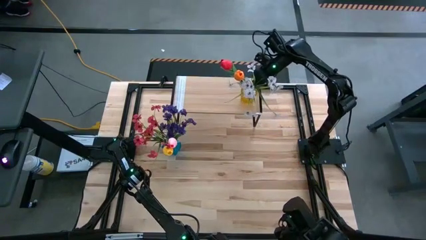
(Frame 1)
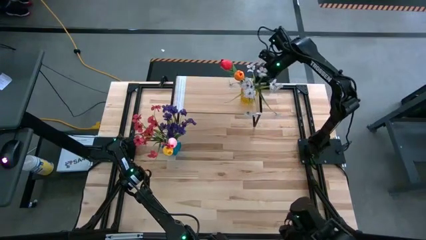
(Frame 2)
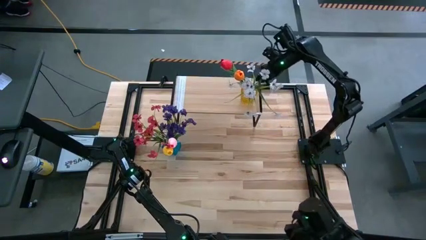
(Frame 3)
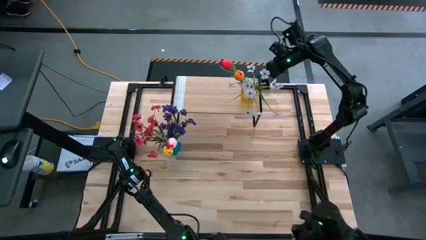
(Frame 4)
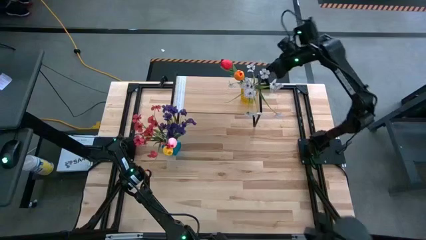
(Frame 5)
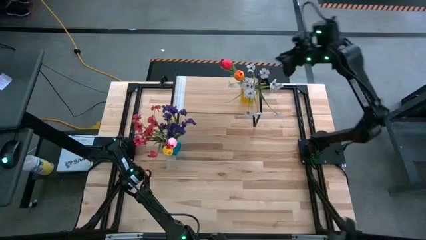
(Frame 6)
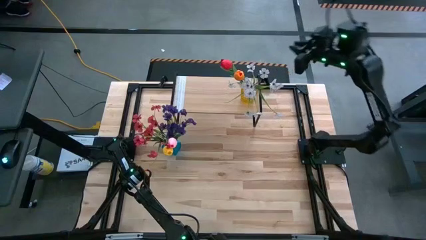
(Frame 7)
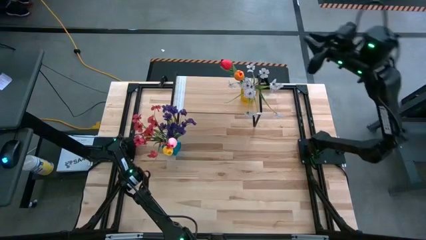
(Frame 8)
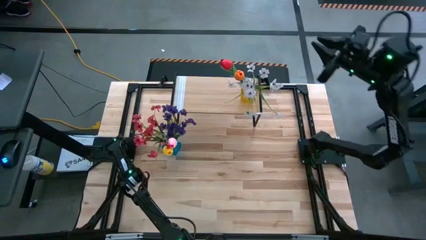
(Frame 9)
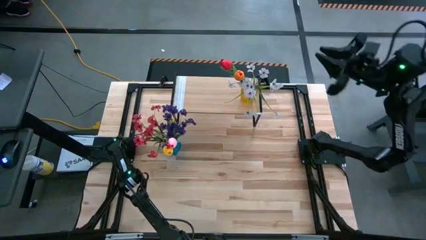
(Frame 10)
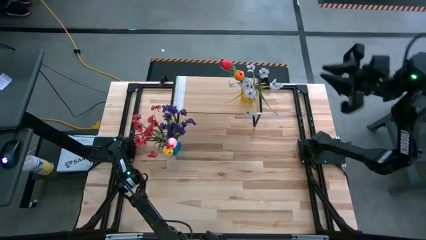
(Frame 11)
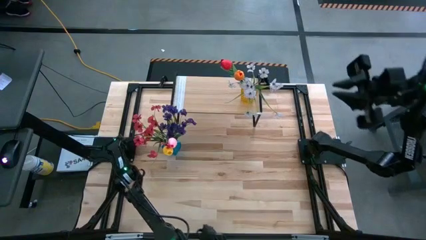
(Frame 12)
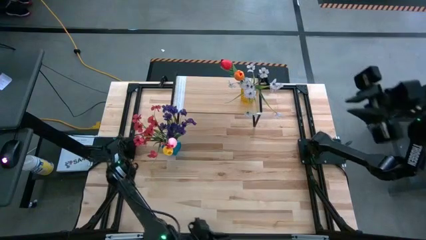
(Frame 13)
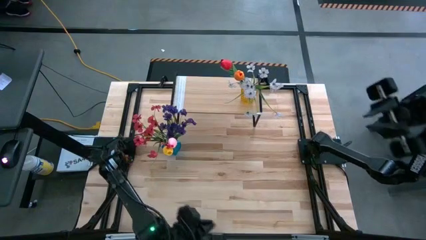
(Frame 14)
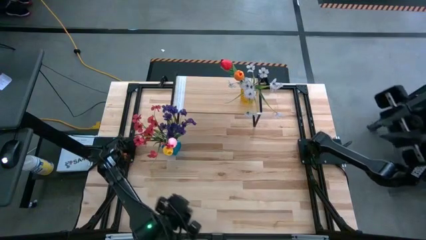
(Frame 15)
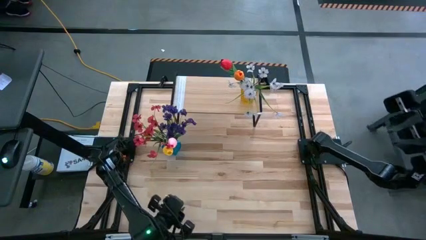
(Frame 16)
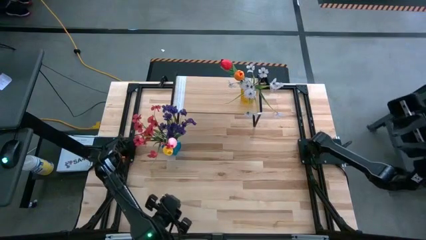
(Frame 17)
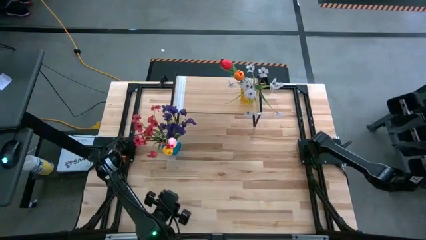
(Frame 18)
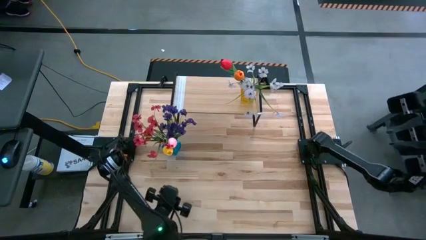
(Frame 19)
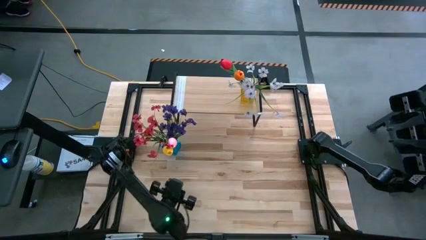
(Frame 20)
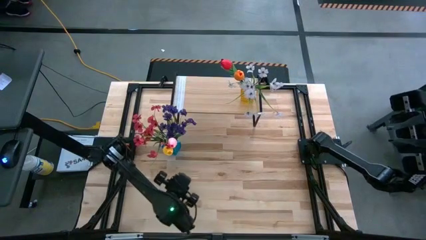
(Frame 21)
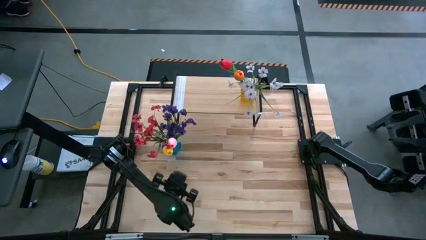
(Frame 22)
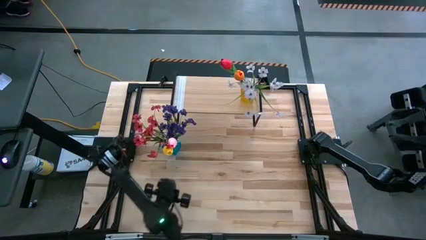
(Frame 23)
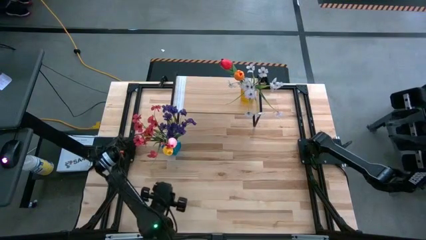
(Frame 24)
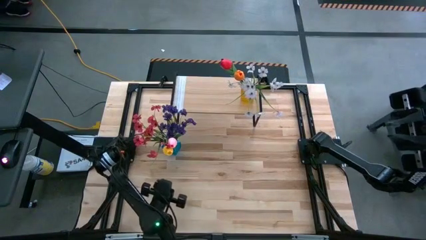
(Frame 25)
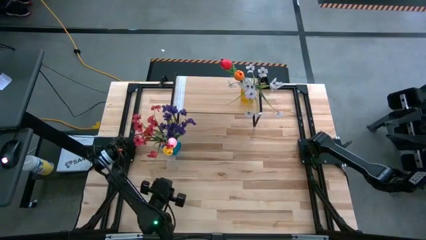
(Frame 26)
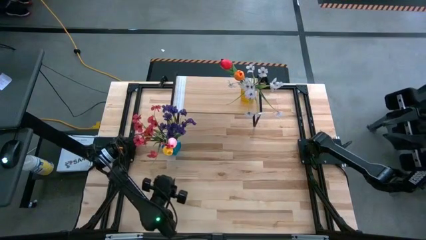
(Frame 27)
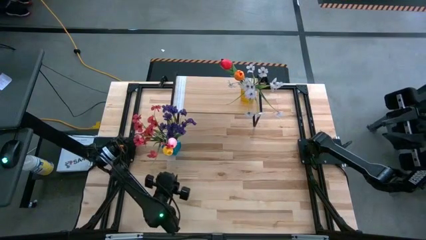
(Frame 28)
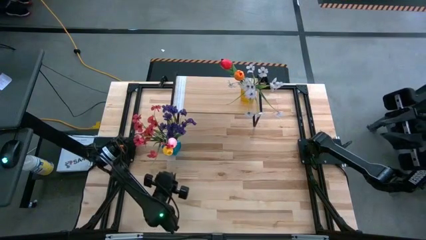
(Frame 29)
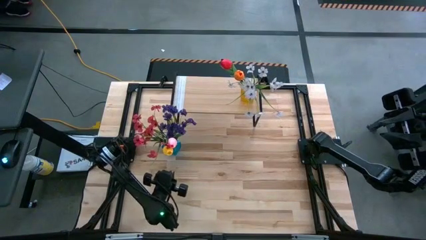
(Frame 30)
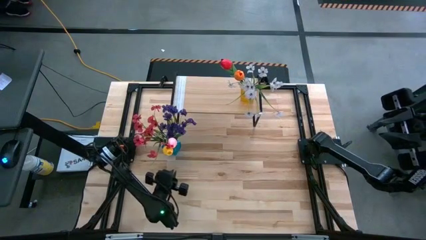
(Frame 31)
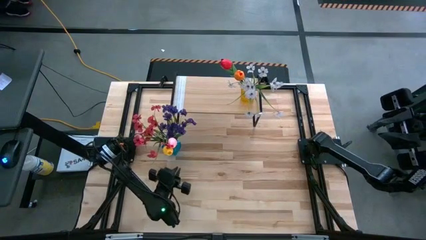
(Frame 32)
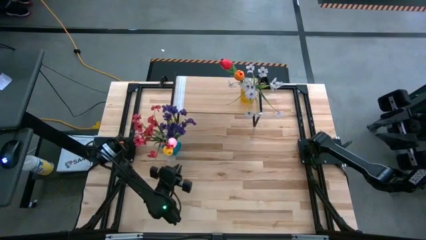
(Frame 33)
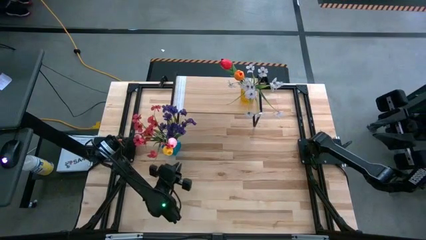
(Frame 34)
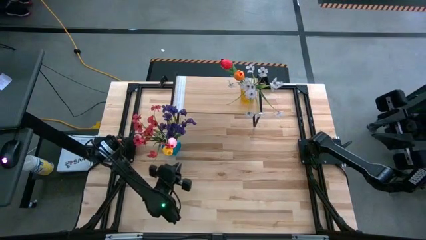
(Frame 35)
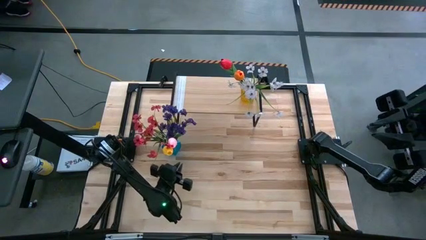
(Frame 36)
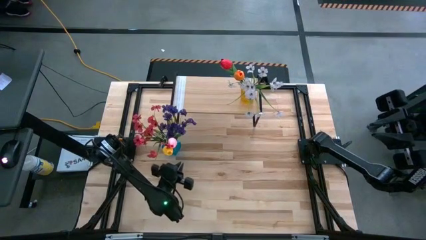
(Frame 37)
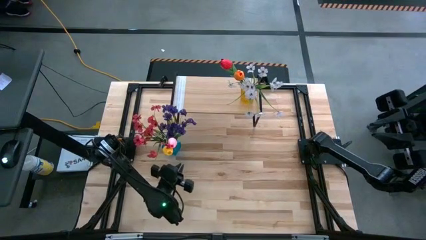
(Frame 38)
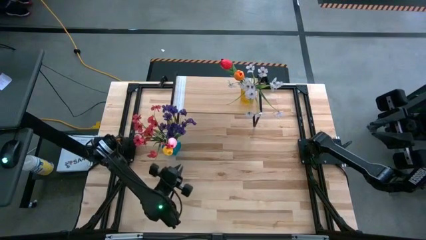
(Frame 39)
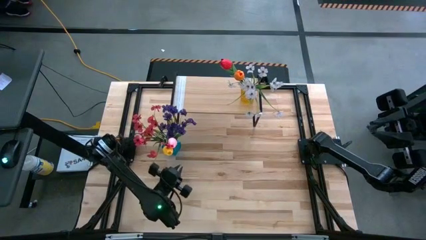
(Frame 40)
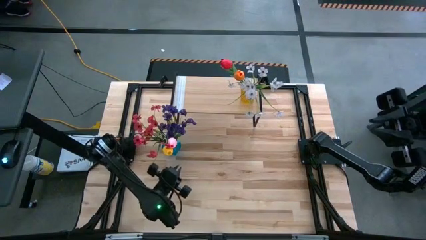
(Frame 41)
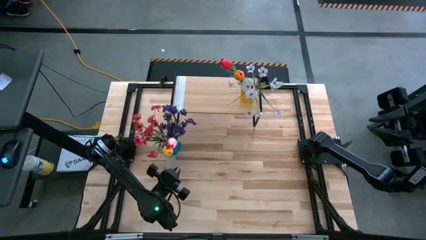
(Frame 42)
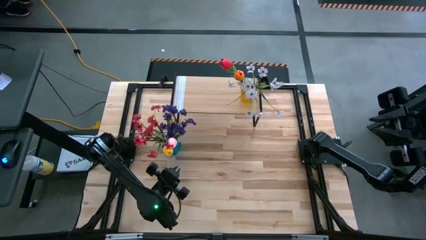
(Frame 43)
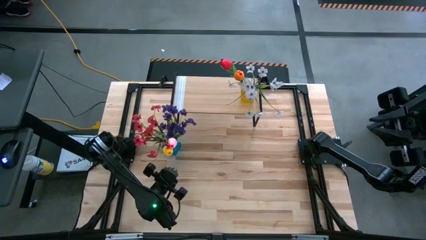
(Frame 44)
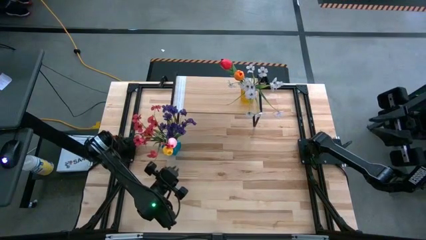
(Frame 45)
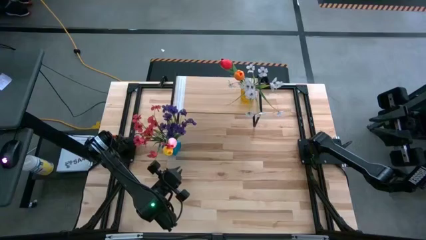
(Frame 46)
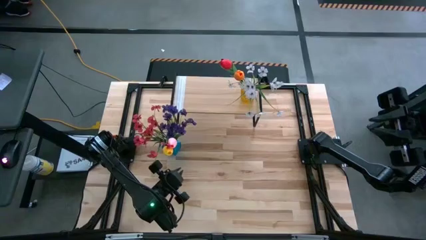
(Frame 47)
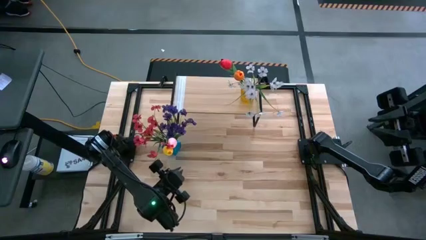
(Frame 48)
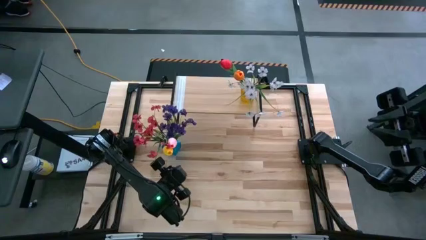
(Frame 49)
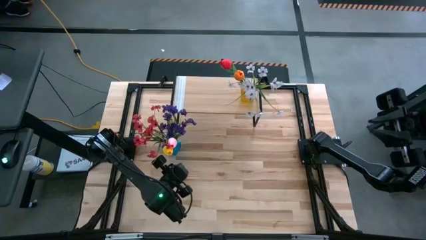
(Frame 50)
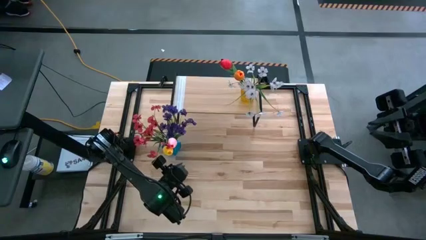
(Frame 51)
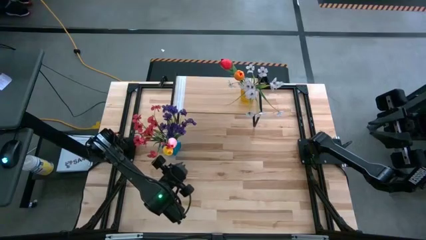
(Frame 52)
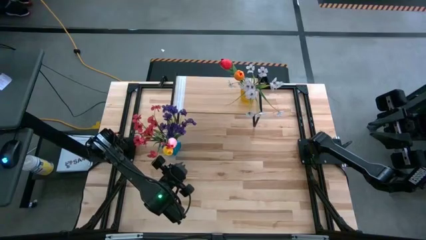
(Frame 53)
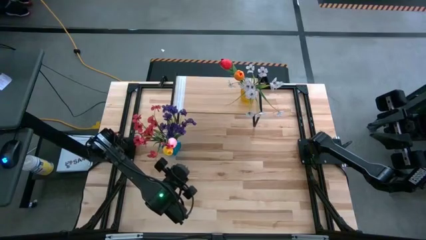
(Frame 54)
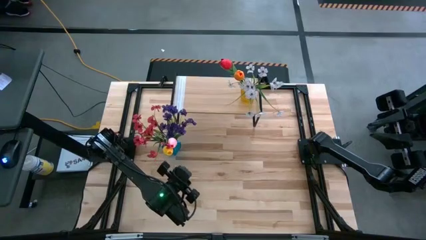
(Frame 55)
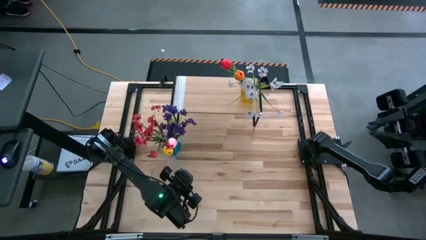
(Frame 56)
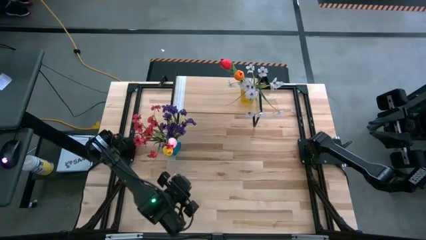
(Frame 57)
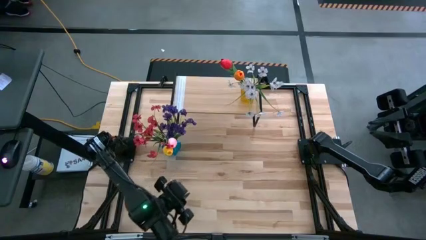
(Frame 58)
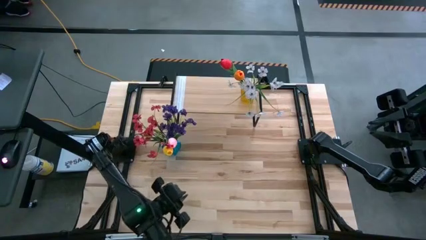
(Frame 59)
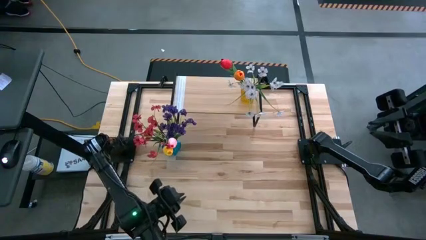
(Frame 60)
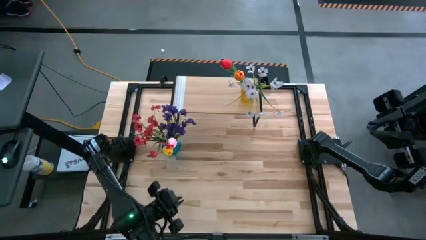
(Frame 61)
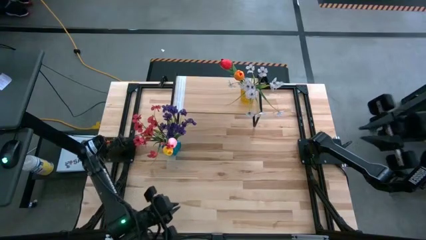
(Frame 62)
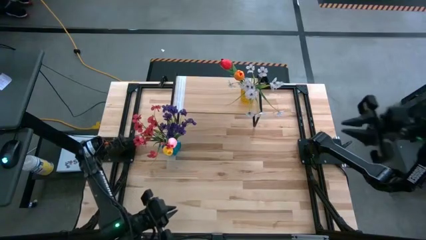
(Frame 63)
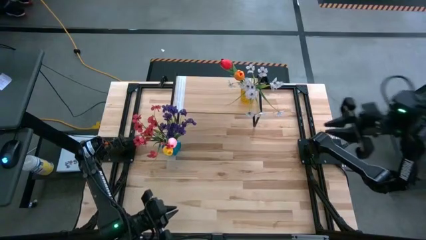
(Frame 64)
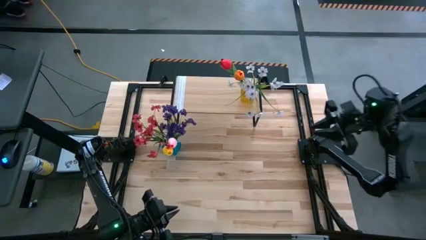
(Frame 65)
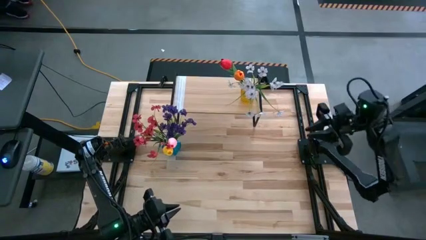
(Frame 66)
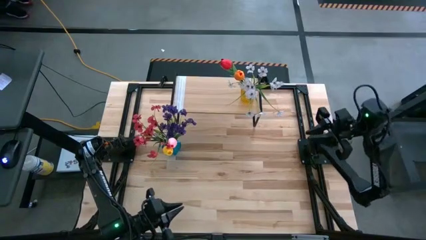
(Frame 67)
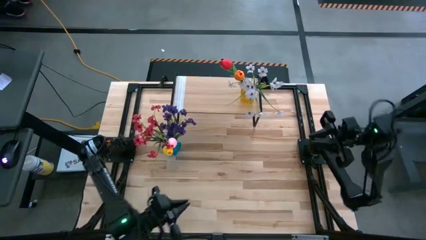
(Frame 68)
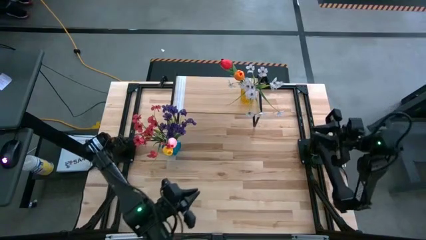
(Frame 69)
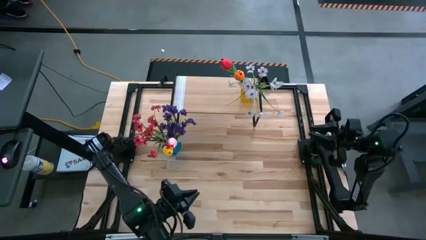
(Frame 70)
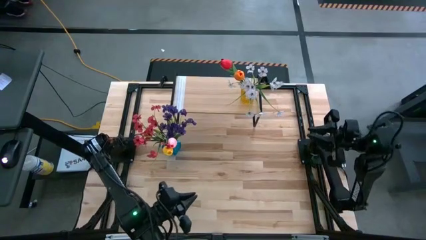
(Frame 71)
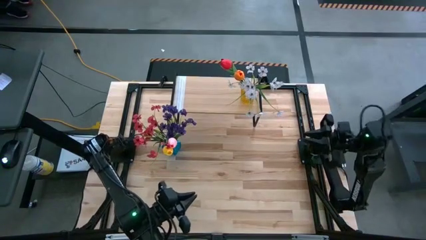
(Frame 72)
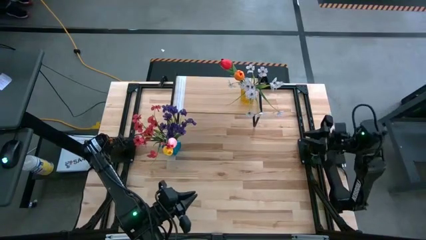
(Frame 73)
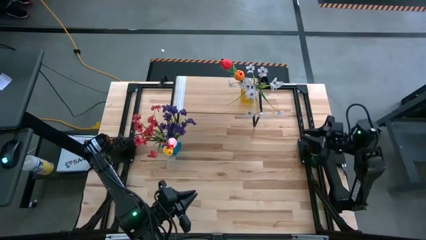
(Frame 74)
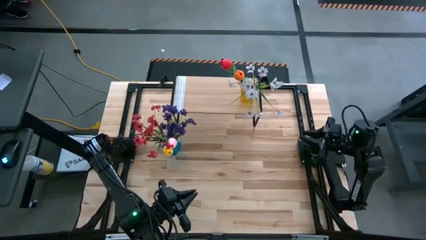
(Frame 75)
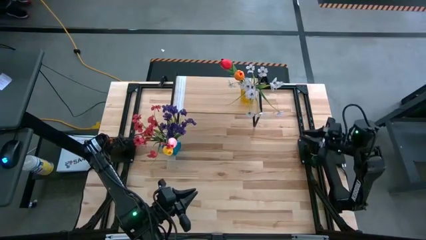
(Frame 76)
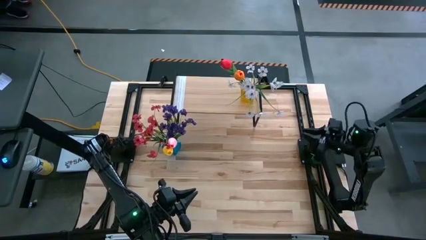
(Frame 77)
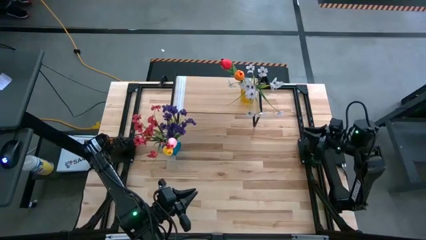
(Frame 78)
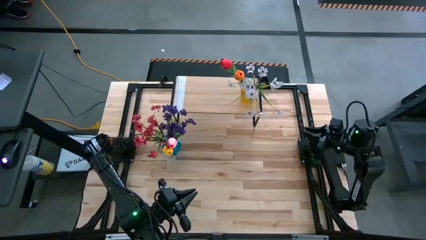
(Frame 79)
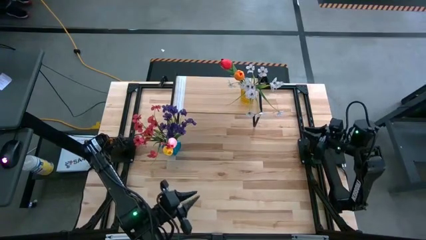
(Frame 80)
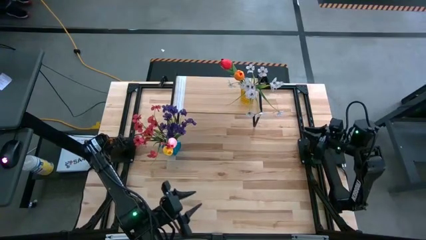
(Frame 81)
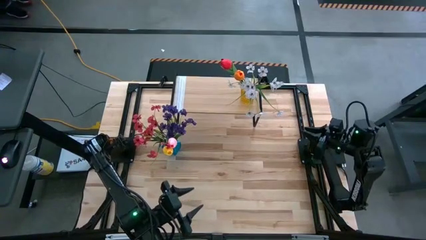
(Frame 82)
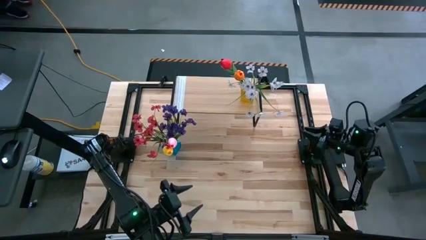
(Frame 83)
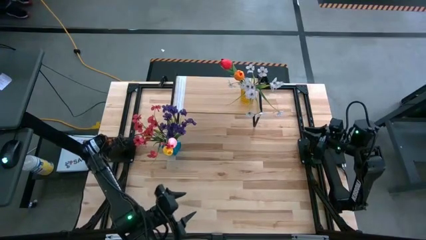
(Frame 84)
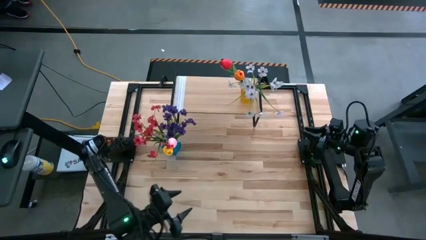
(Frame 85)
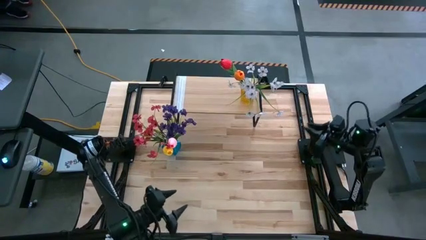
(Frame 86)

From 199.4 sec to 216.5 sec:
Task: Pick and place flowers into a vace then onto a shelf
Put the blue vase on the shelf
